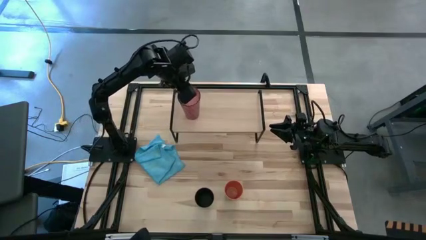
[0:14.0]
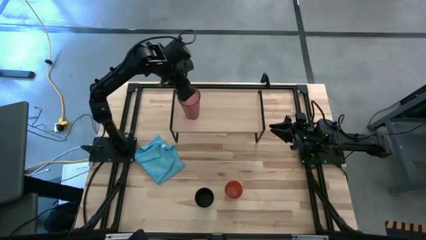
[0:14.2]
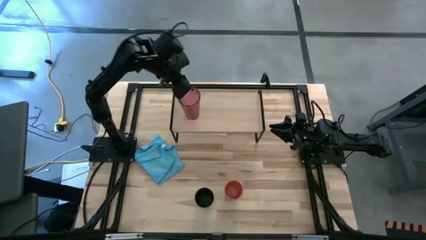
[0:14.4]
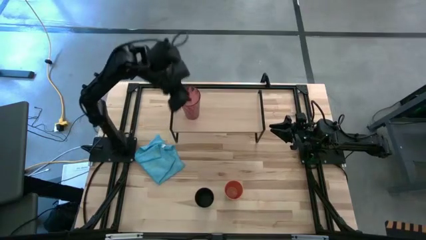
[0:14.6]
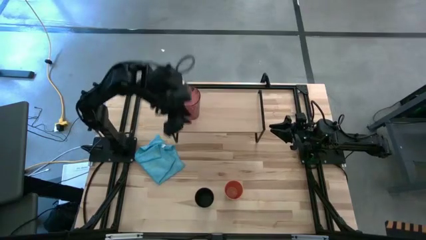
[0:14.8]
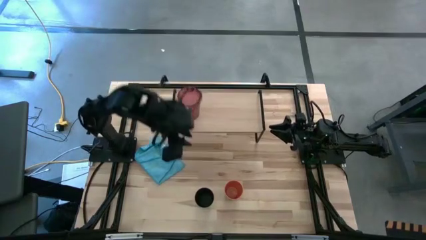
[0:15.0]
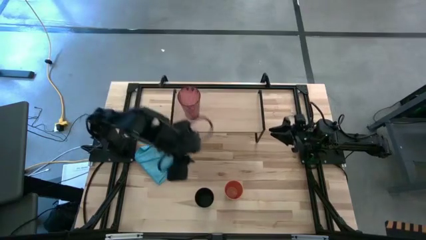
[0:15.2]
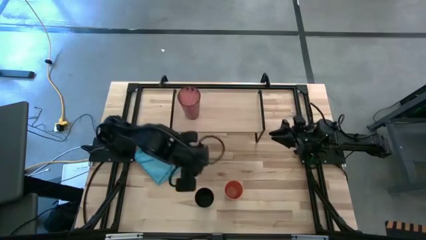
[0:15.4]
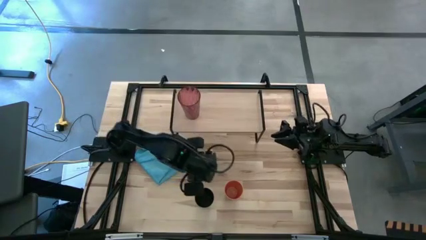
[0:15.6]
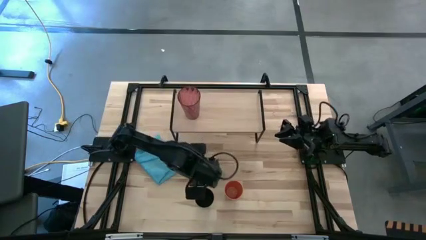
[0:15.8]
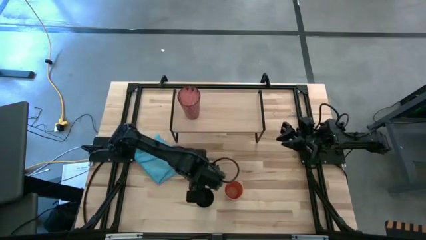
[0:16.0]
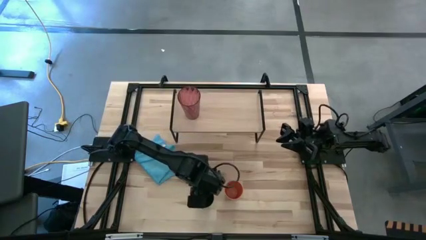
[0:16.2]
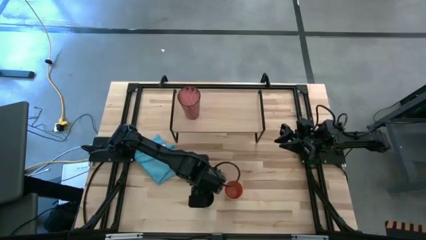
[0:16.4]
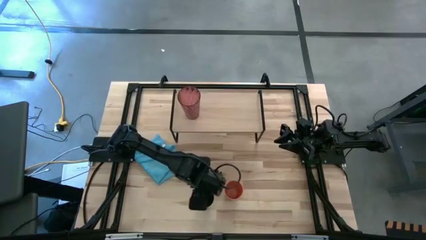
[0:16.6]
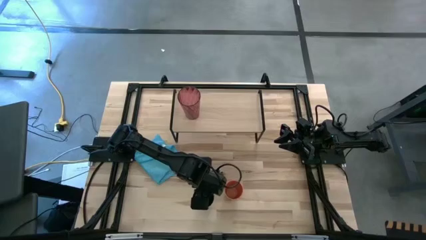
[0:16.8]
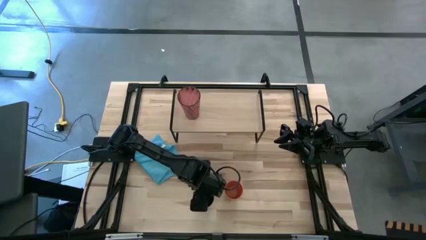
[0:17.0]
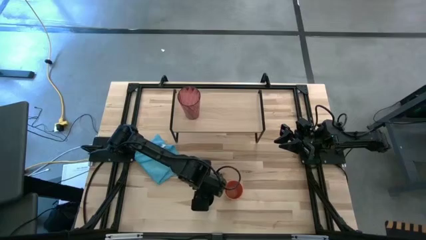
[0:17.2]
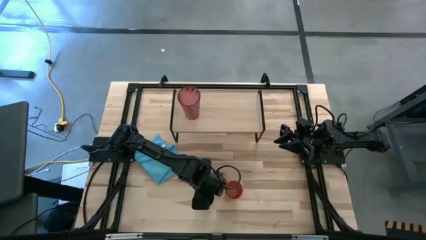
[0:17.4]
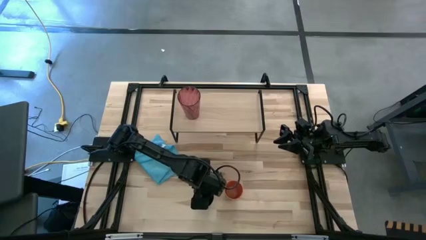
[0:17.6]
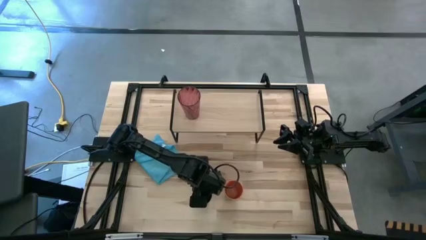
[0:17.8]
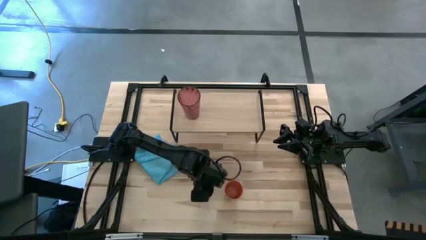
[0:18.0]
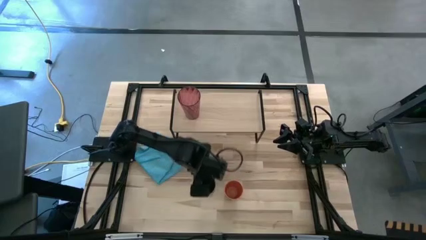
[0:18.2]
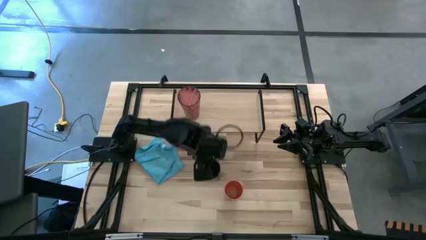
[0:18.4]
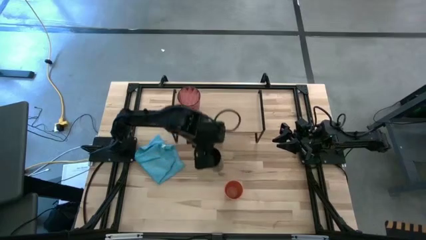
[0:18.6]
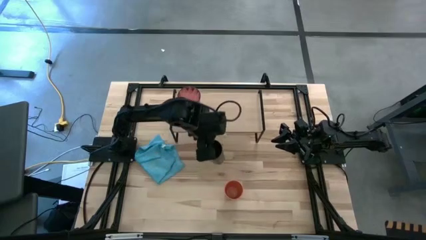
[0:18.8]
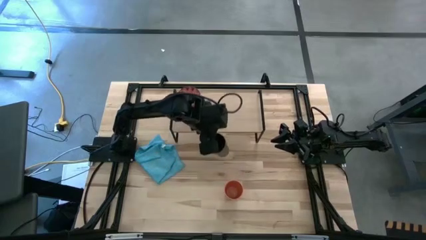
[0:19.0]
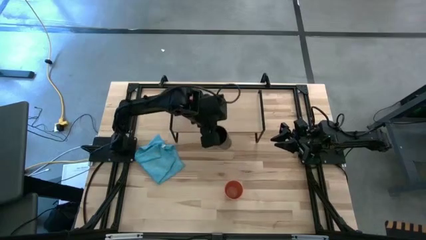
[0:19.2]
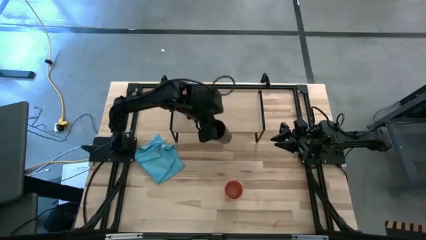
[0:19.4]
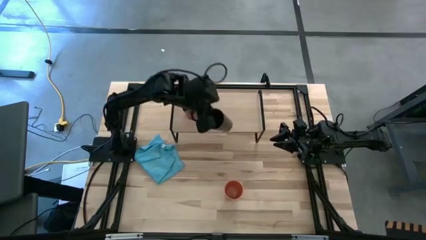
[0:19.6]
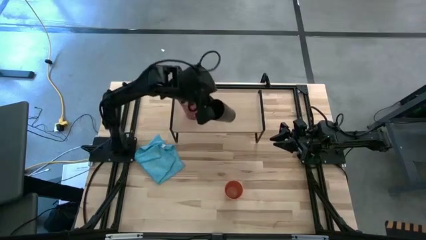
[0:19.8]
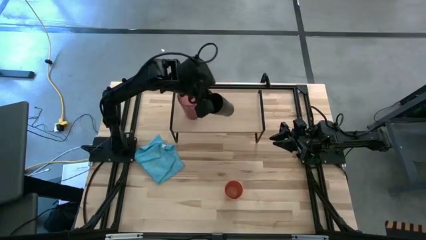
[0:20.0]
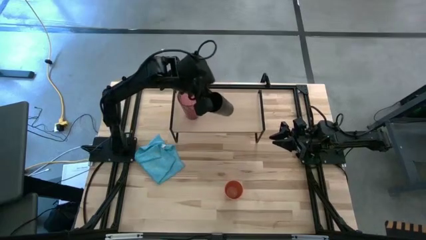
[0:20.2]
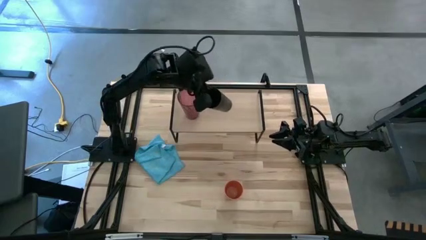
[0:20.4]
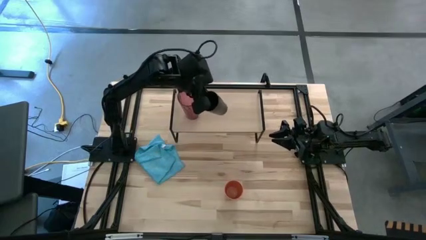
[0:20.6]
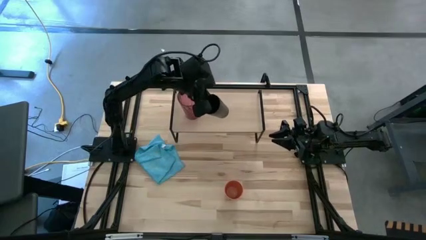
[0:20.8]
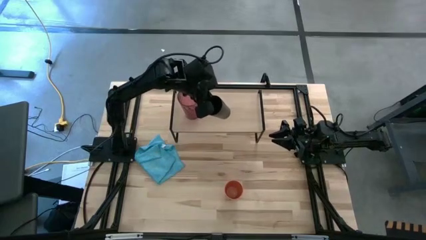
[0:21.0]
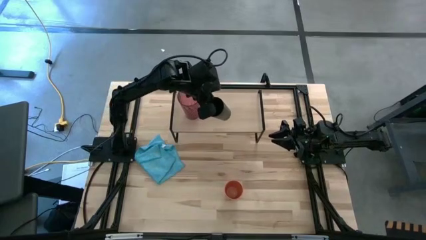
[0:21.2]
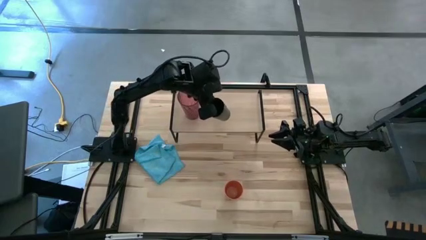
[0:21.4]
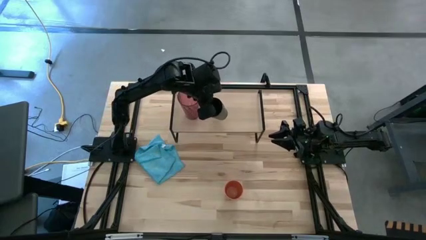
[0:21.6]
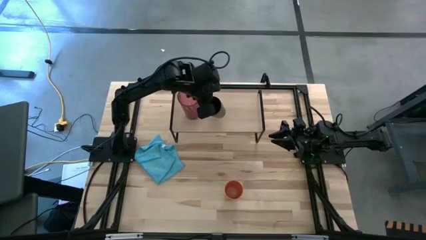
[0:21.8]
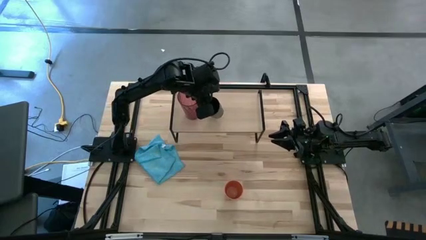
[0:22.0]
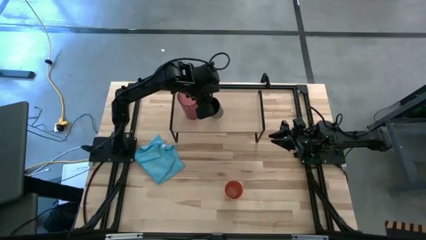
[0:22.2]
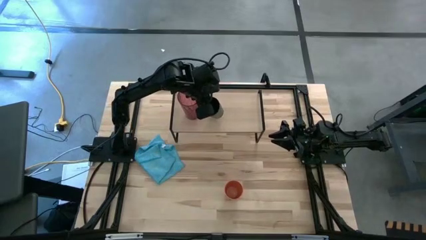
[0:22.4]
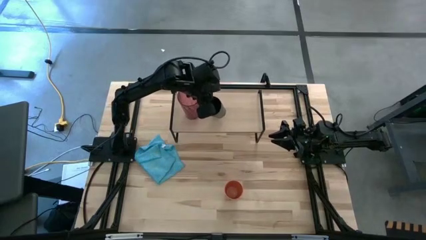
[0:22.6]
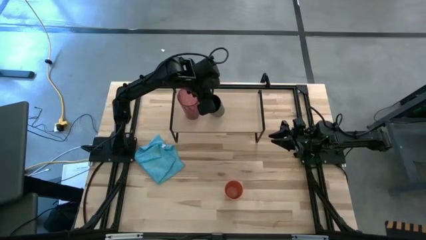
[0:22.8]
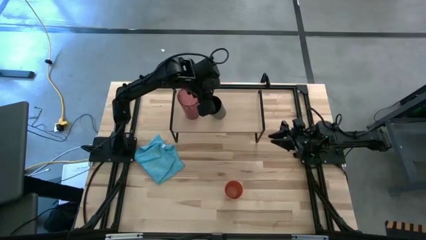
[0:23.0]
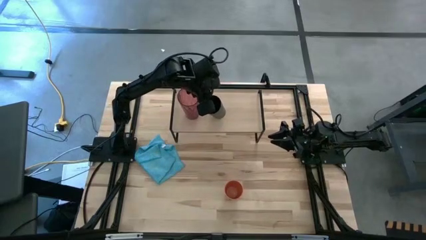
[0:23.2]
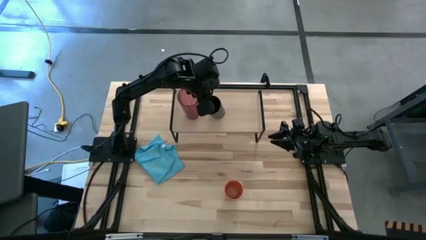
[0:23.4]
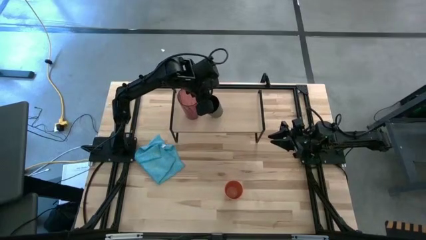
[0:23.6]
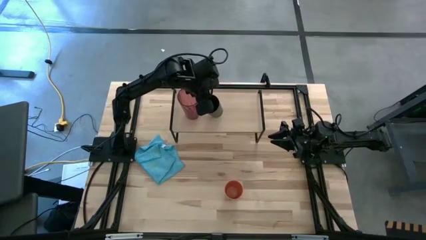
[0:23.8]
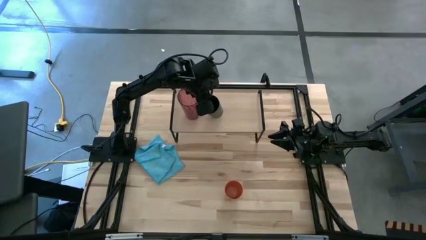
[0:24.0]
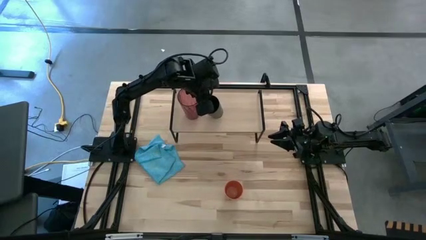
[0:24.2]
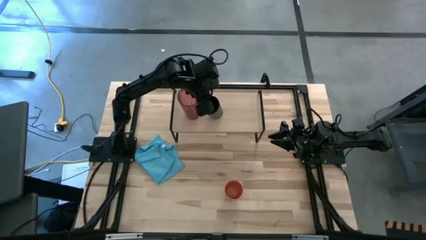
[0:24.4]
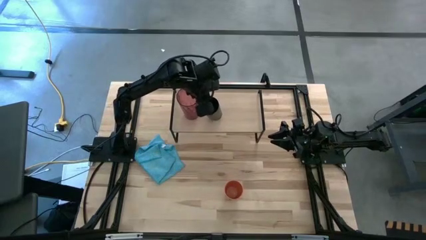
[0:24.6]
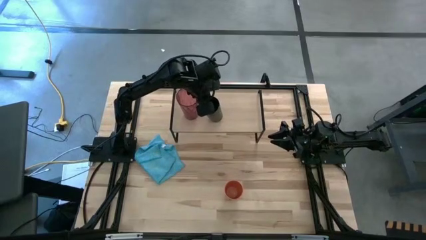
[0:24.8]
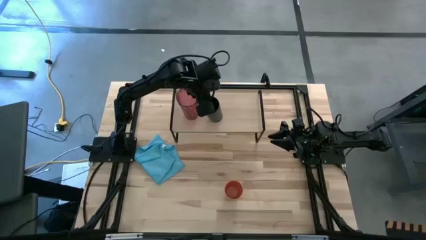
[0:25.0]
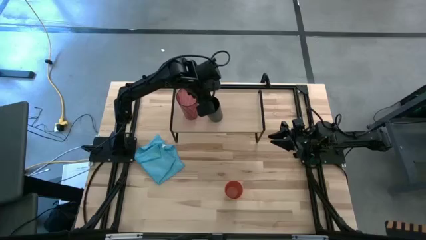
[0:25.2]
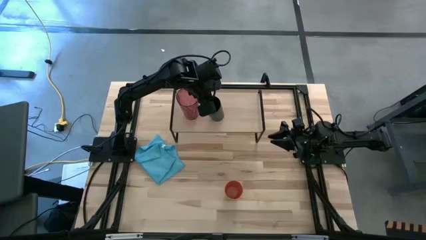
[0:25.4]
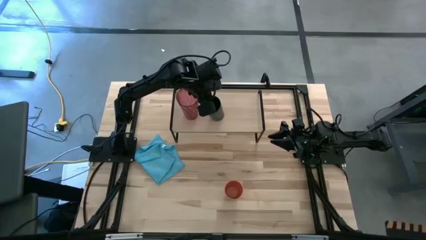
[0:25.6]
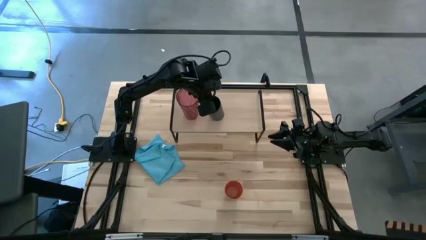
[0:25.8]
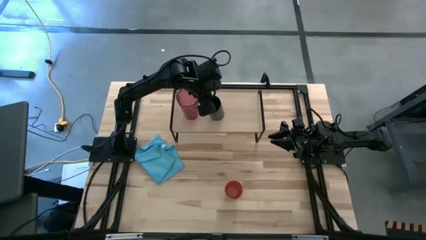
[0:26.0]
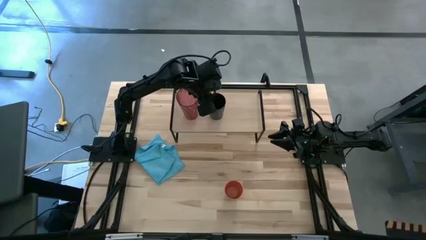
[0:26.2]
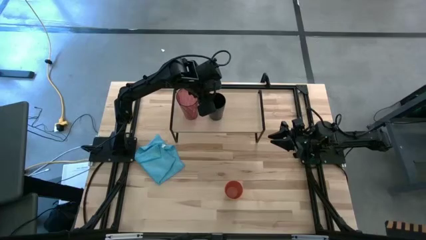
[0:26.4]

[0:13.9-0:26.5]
Task: Stack small to large cups/mugs on shelf
Put the black cup on the shelf
